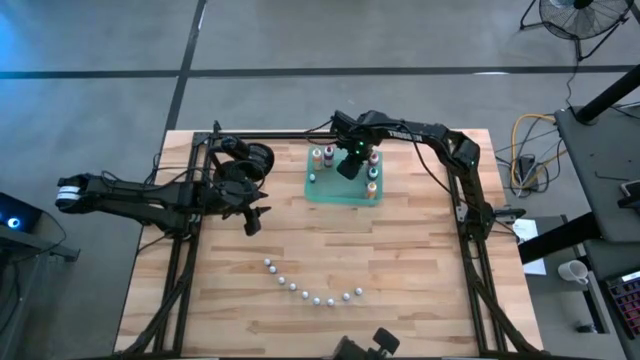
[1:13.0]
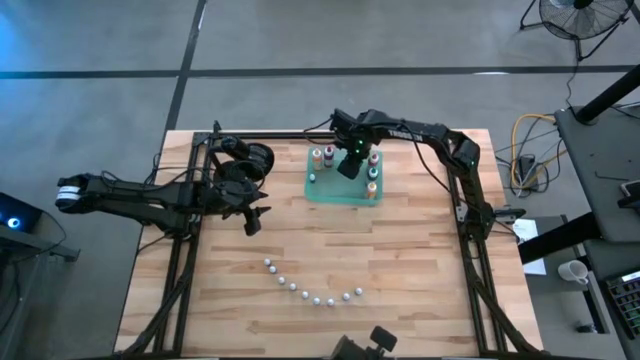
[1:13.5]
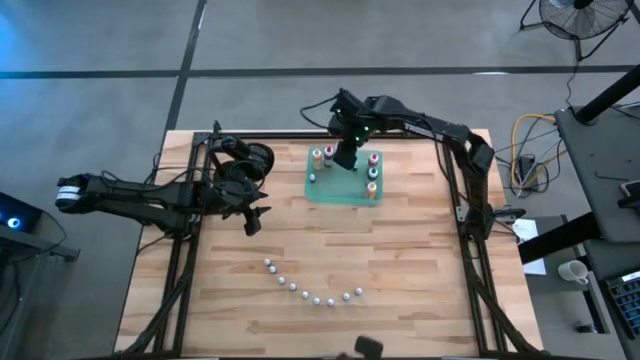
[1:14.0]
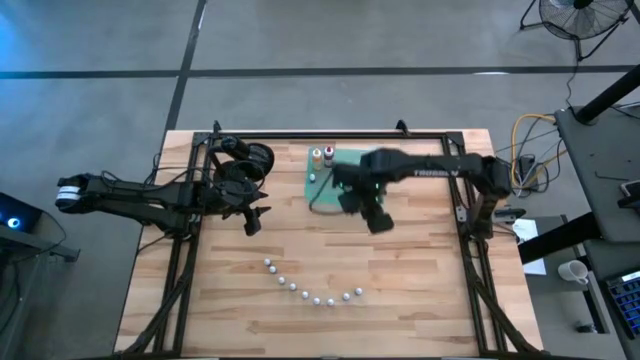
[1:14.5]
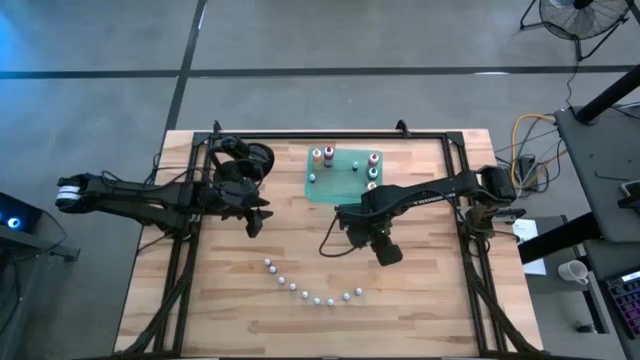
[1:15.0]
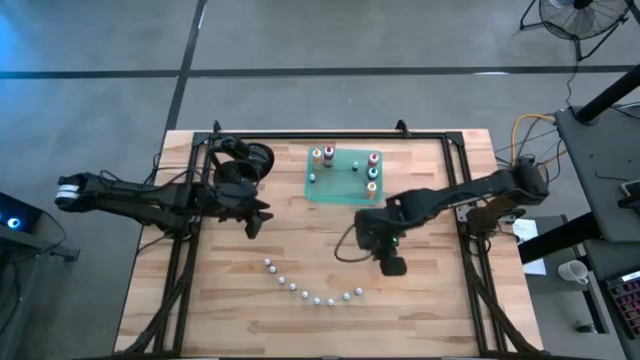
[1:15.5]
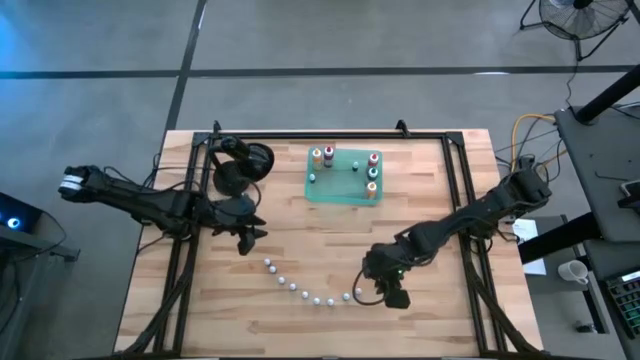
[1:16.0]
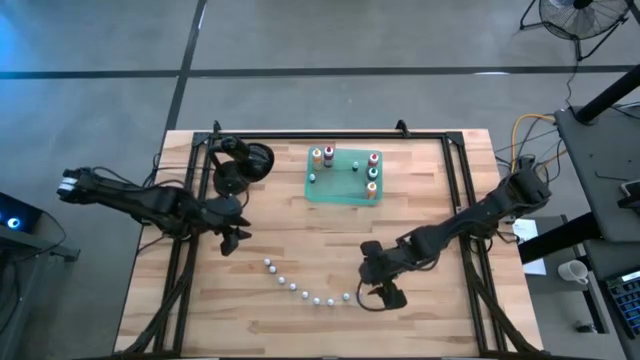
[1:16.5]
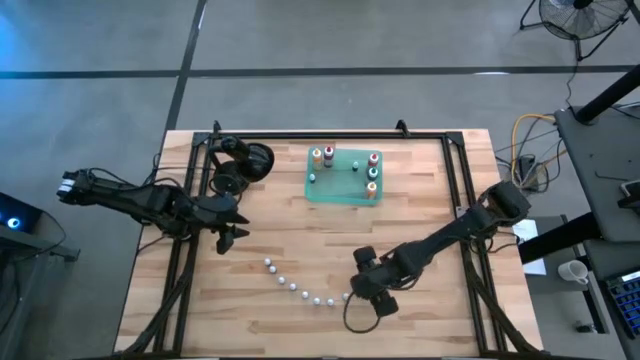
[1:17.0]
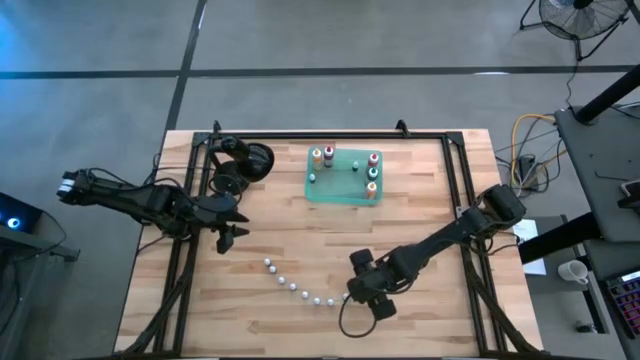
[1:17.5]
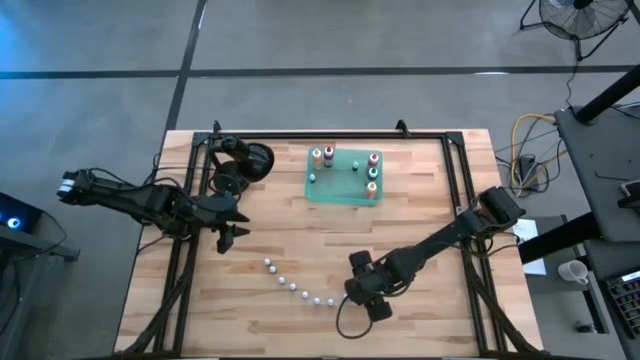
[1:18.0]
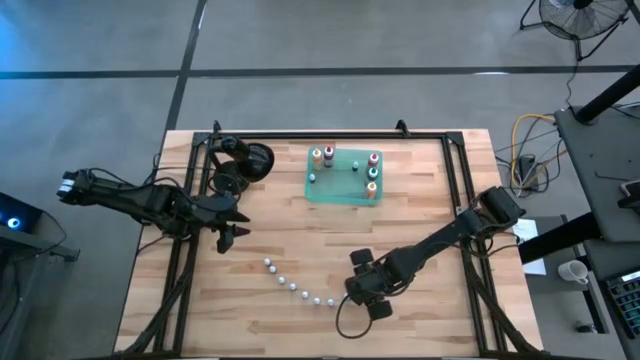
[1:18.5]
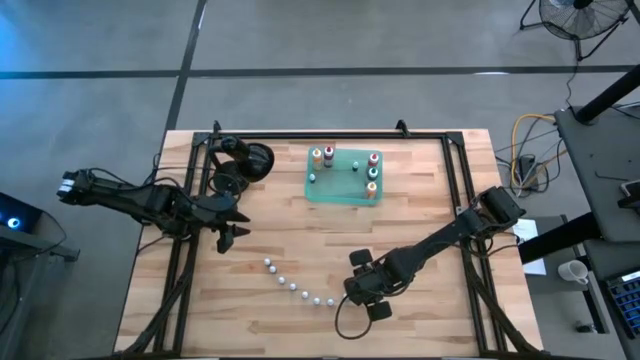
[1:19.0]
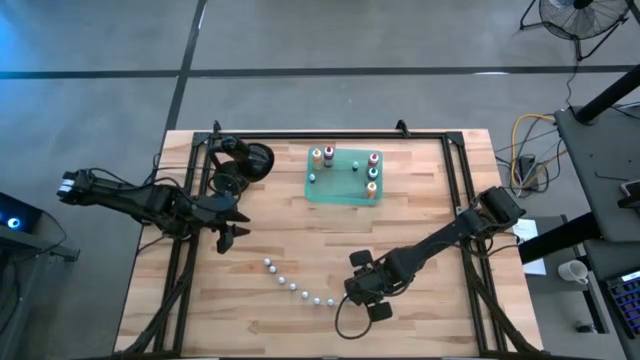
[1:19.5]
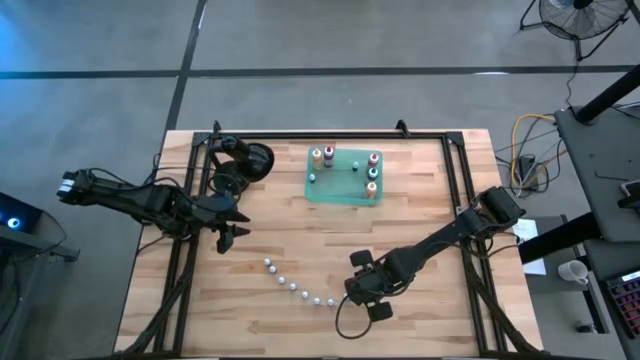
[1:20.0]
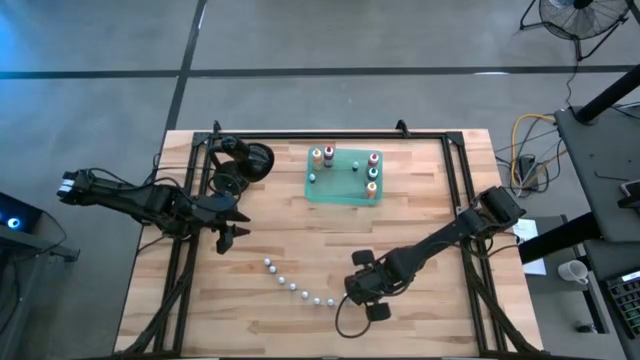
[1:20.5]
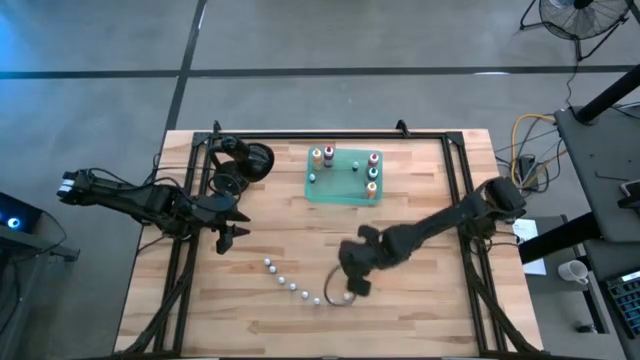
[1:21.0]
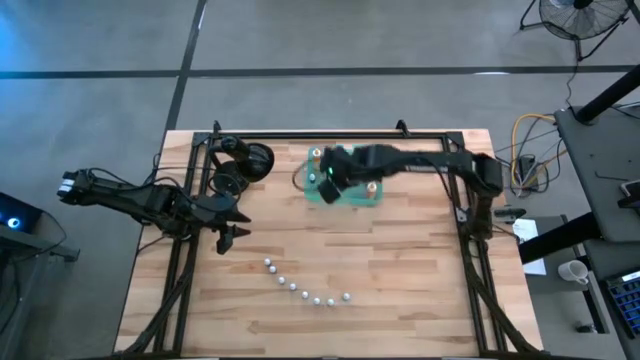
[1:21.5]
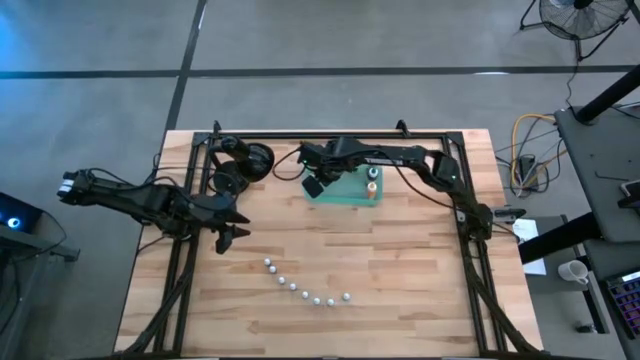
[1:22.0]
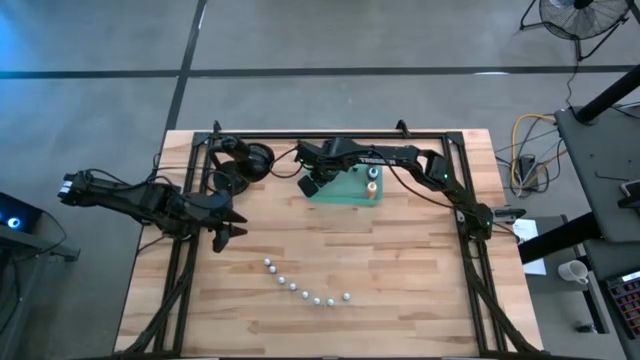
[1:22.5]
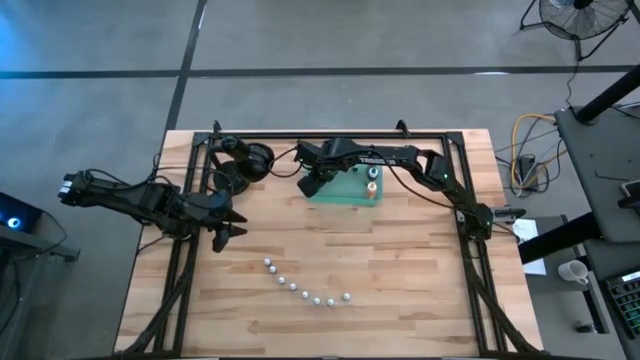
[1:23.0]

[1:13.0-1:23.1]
Task: Pick & Place food coloring
Put the right small green food coloring bottle into the green bin

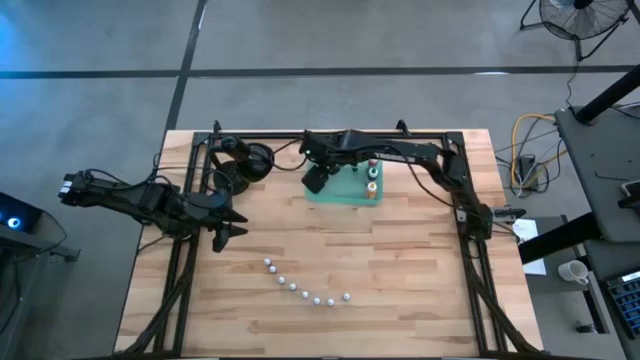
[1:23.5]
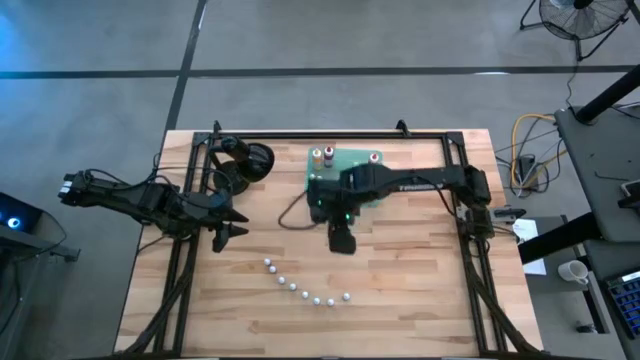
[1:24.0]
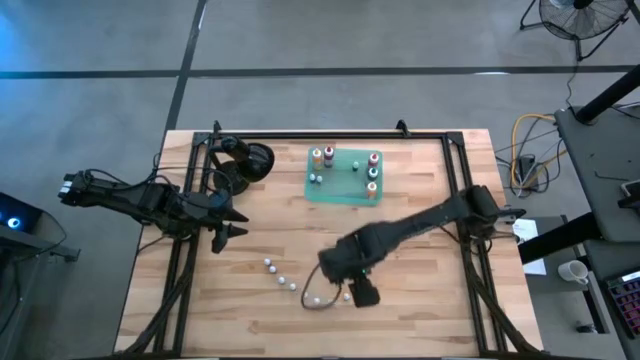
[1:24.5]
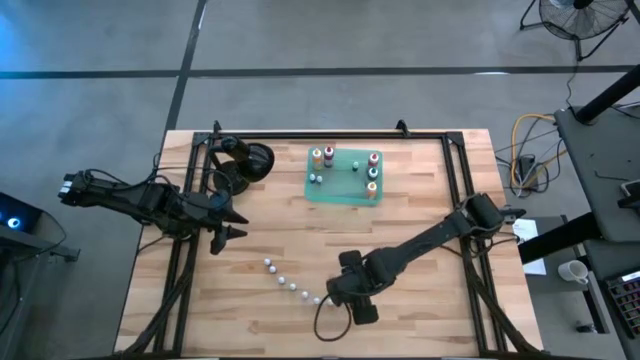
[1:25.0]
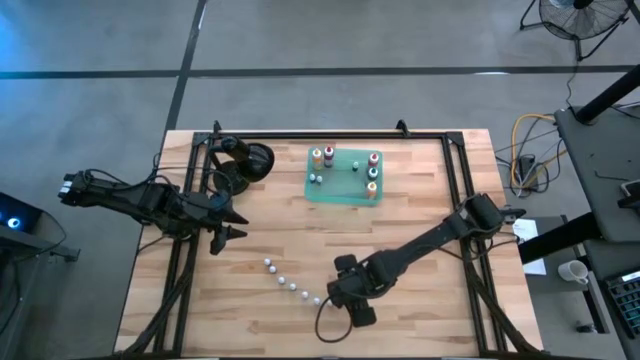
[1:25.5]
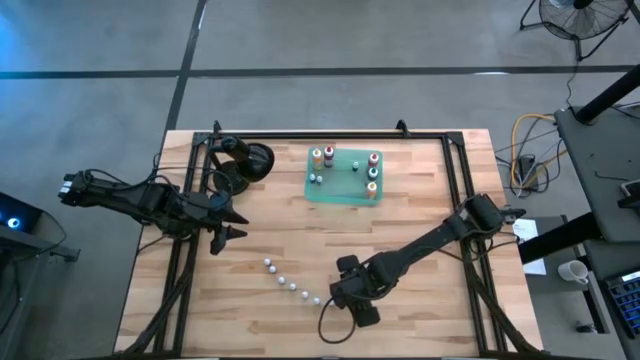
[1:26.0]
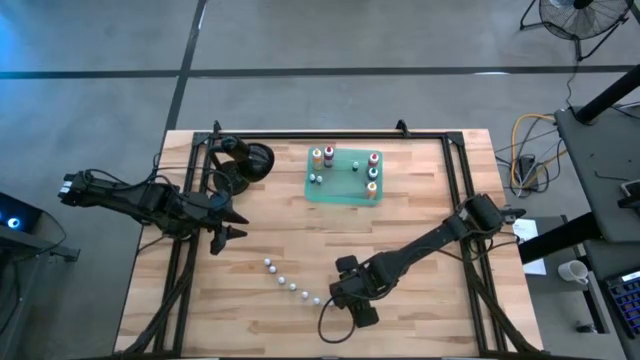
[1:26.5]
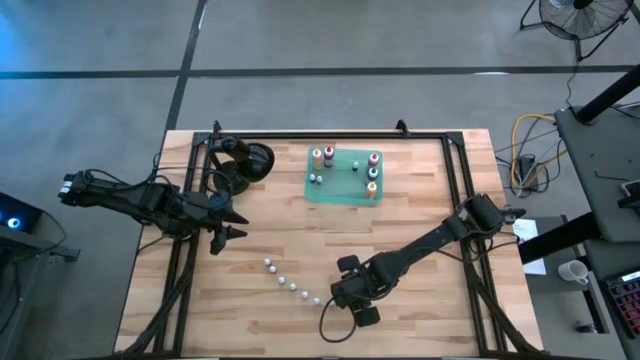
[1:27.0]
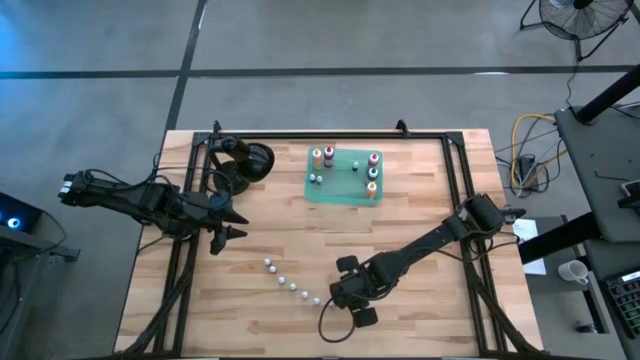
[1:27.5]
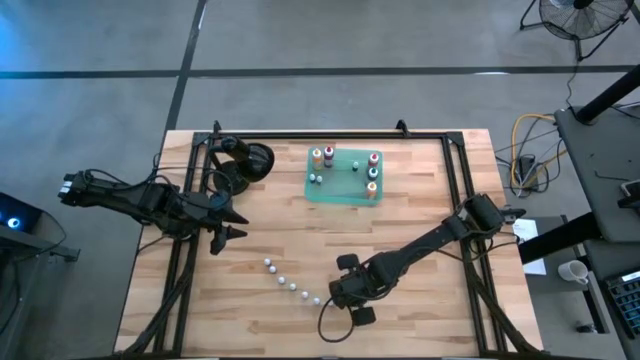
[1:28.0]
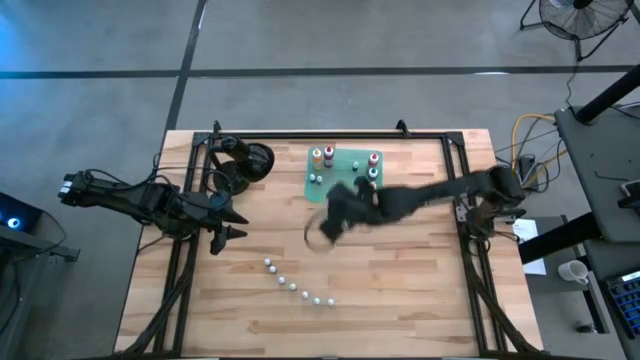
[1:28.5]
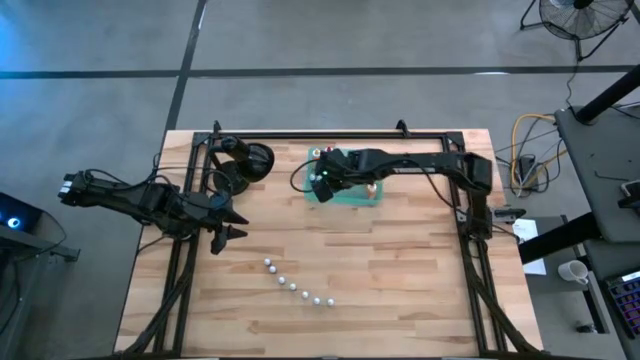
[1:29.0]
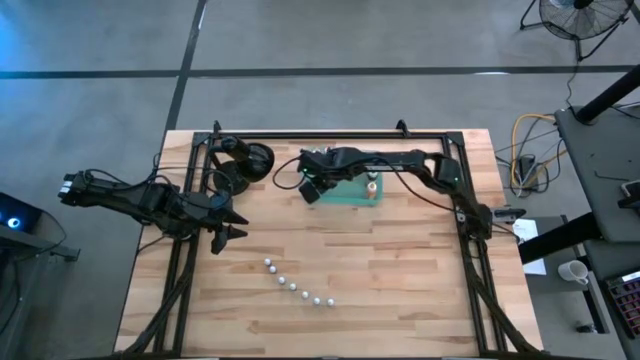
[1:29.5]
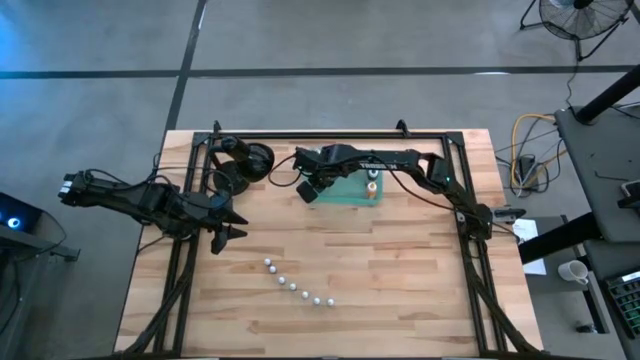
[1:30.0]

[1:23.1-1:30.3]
Put the right small blue food coloring bottle into the green bin

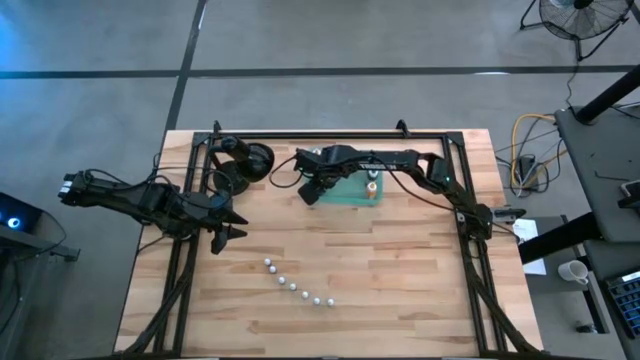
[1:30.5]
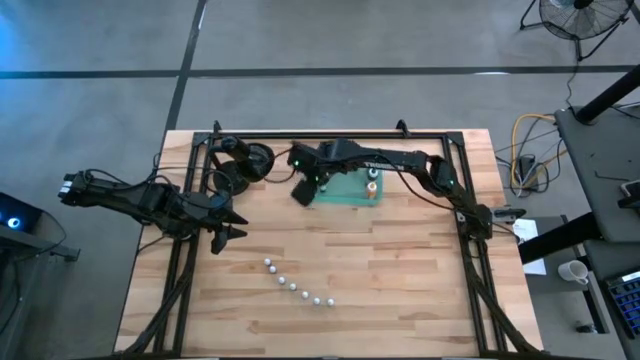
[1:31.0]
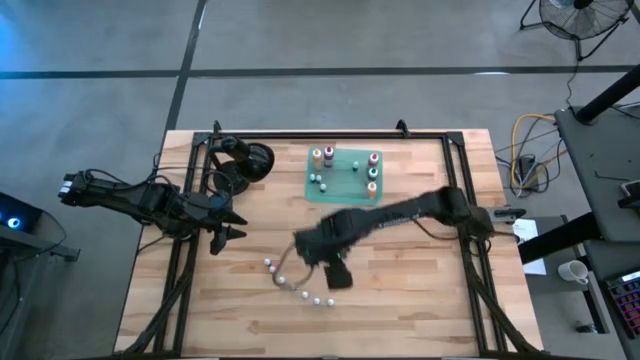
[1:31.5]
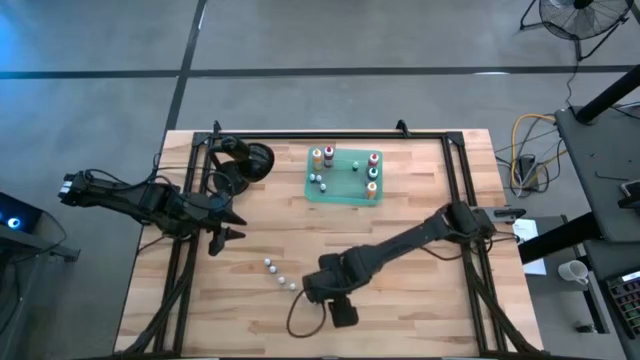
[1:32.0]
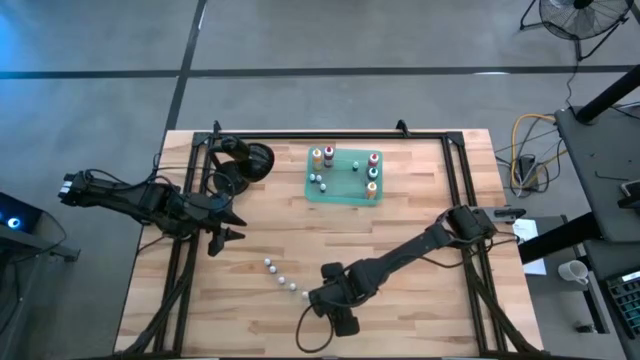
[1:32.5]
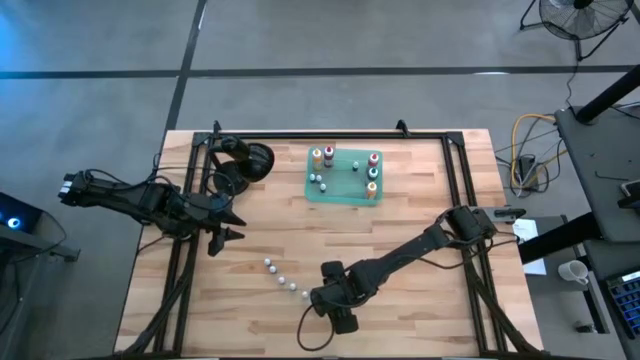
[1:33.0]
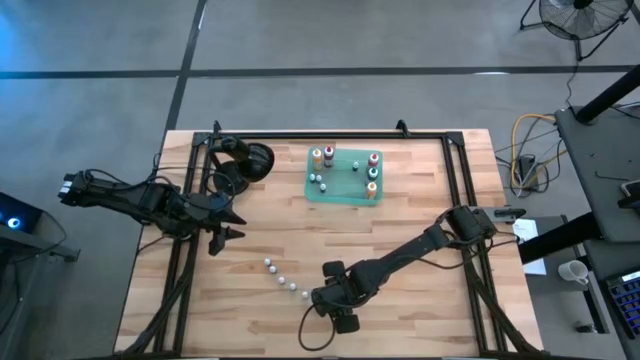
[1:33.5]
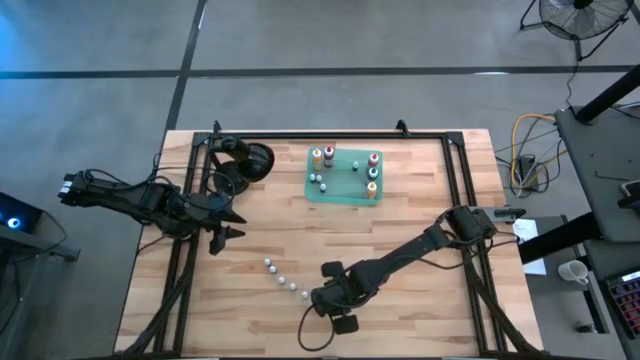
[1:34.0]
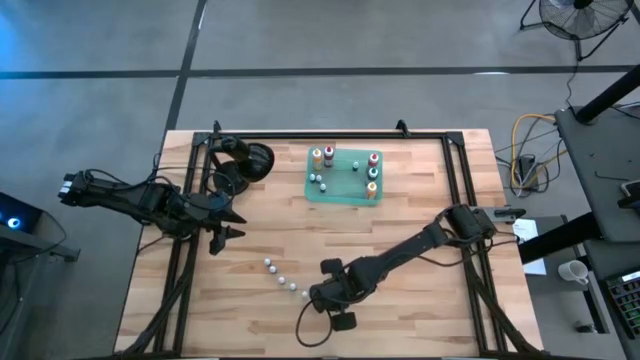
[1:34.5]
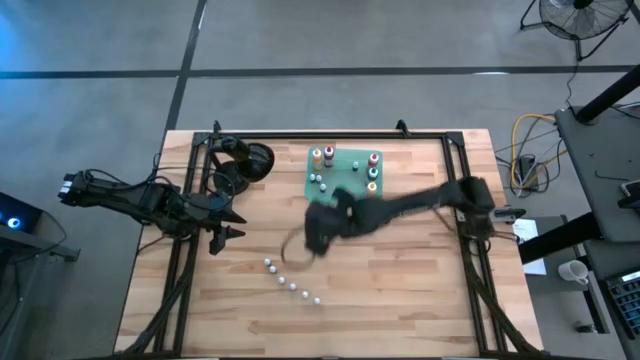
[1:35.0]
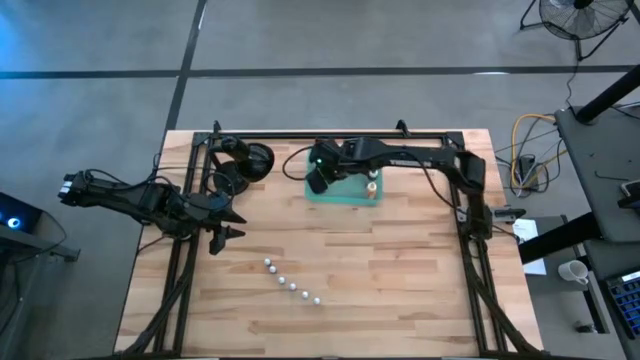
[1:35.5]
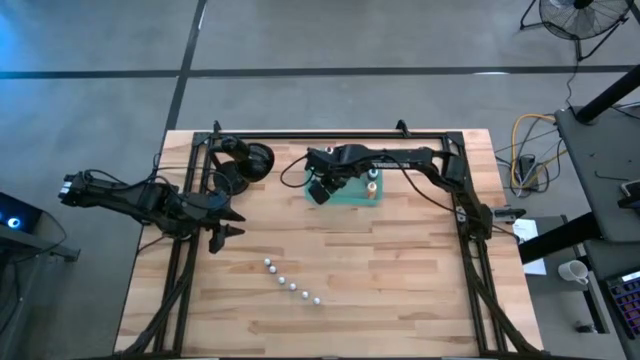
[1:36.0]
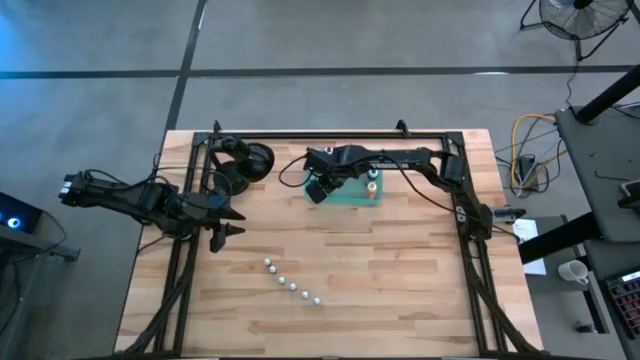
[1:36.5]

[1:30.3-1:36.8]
Put the small pink food coloring bottle into the green bin
